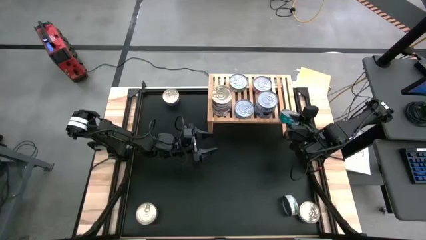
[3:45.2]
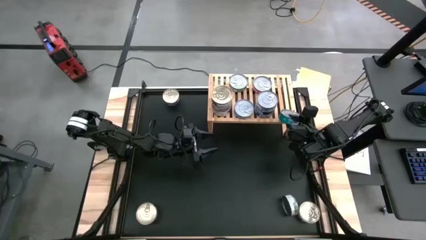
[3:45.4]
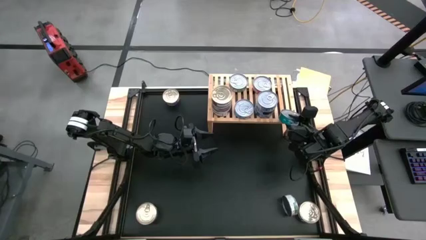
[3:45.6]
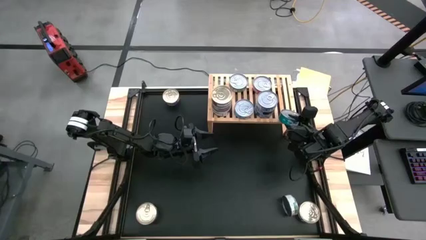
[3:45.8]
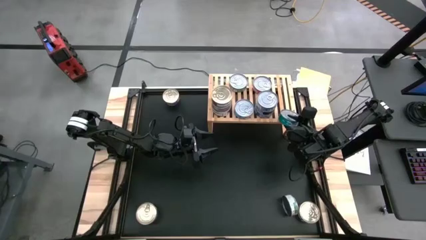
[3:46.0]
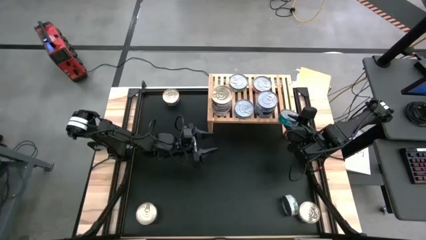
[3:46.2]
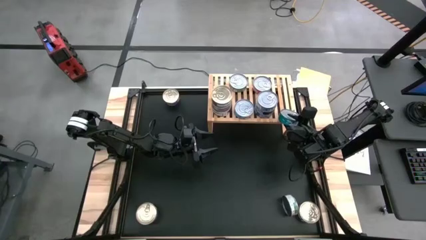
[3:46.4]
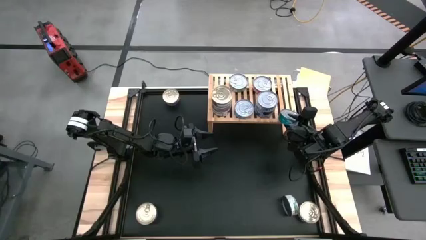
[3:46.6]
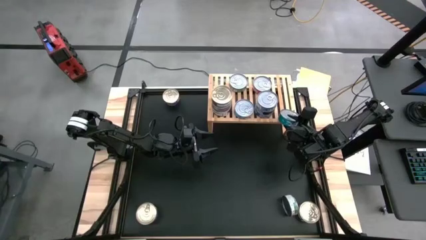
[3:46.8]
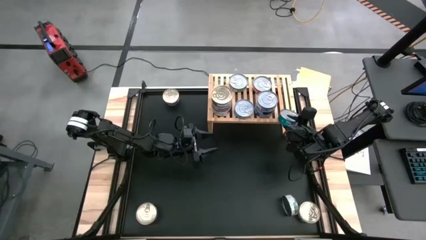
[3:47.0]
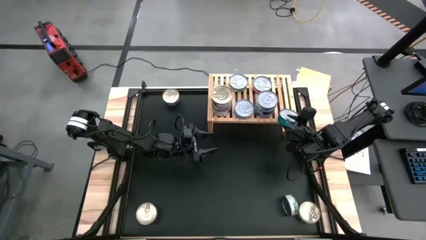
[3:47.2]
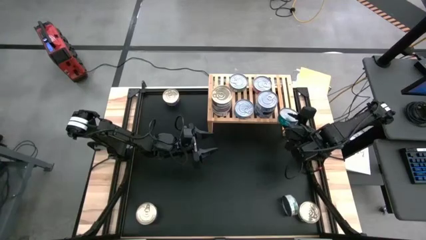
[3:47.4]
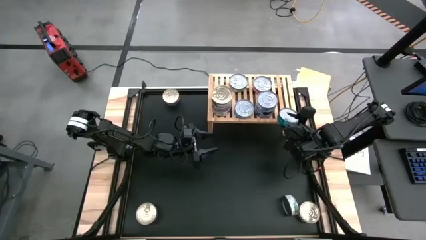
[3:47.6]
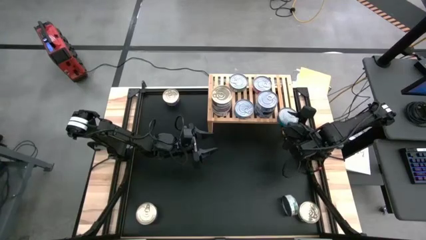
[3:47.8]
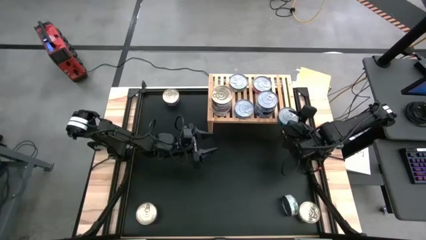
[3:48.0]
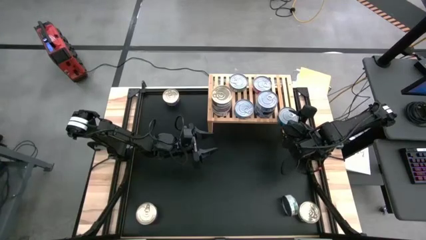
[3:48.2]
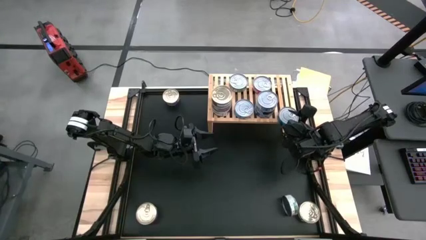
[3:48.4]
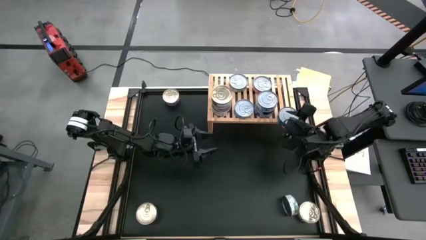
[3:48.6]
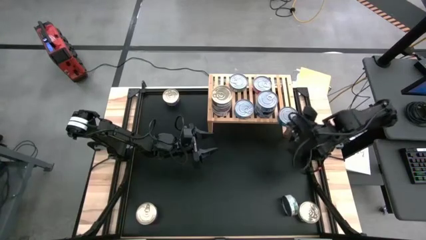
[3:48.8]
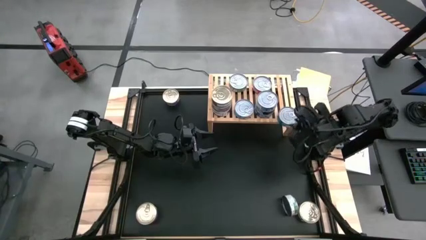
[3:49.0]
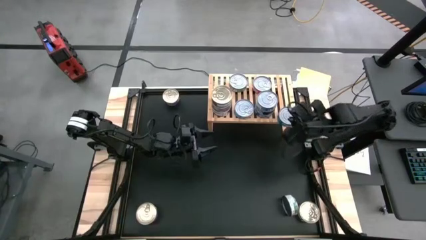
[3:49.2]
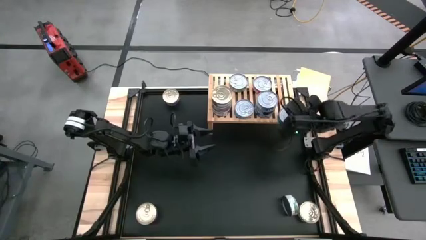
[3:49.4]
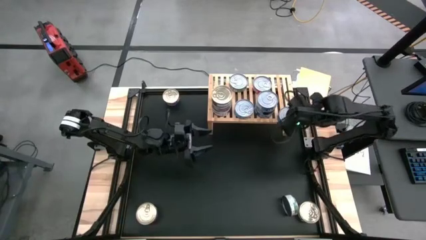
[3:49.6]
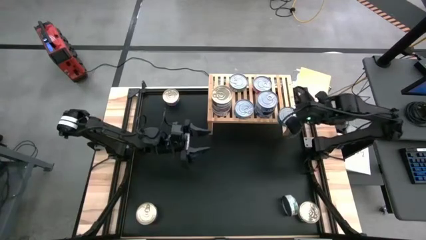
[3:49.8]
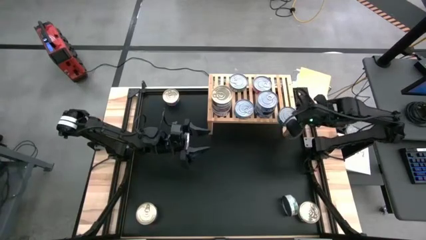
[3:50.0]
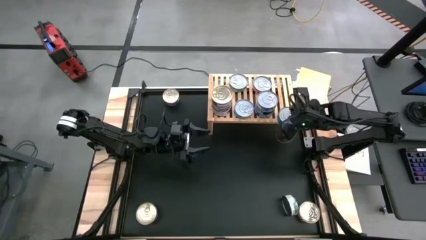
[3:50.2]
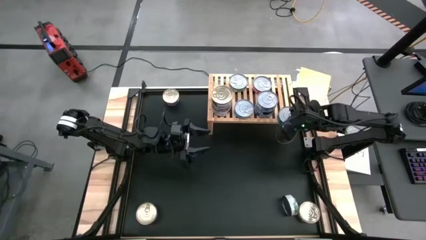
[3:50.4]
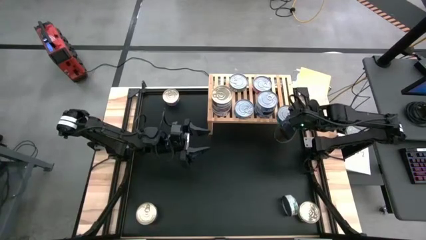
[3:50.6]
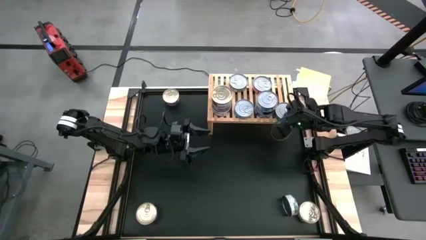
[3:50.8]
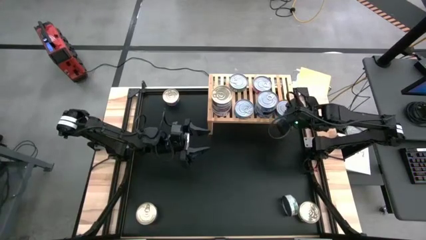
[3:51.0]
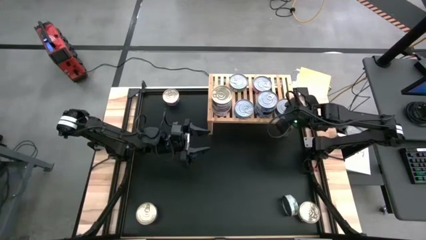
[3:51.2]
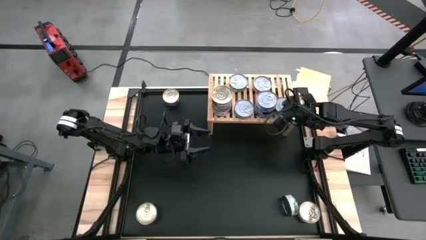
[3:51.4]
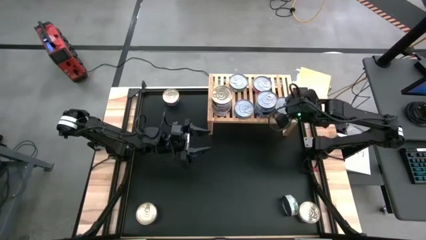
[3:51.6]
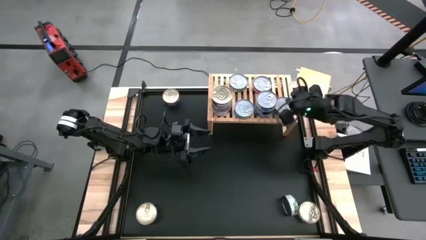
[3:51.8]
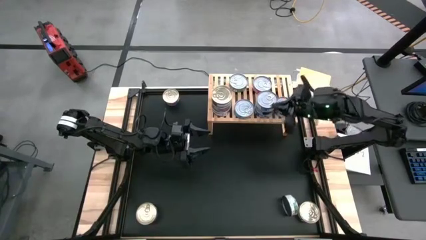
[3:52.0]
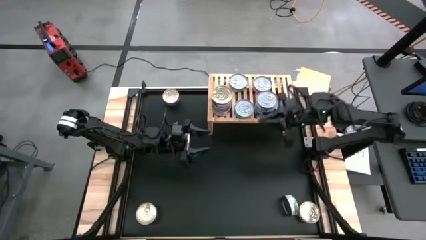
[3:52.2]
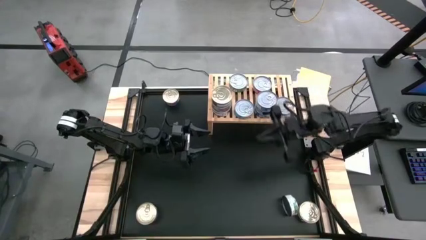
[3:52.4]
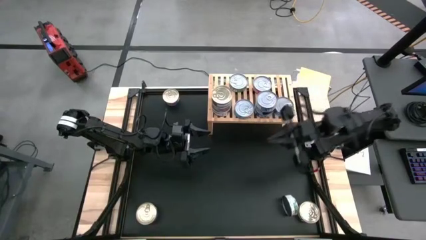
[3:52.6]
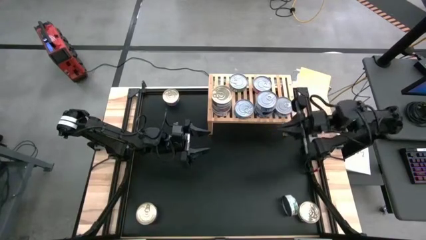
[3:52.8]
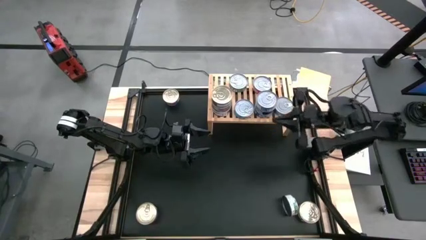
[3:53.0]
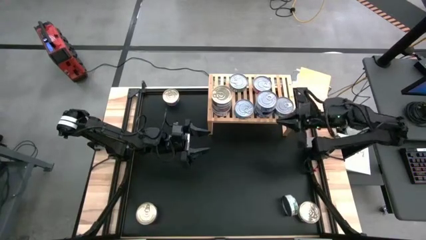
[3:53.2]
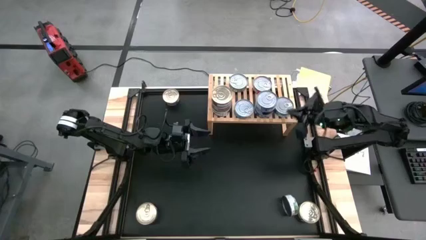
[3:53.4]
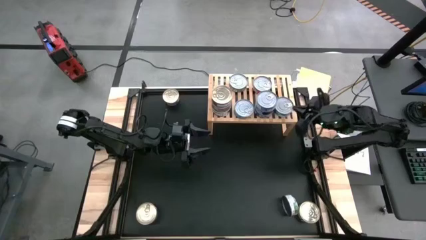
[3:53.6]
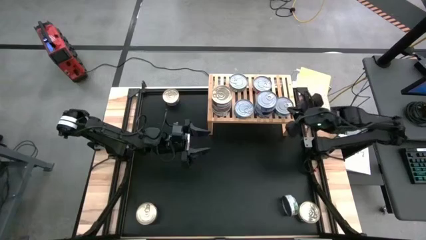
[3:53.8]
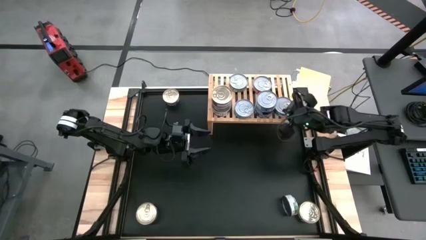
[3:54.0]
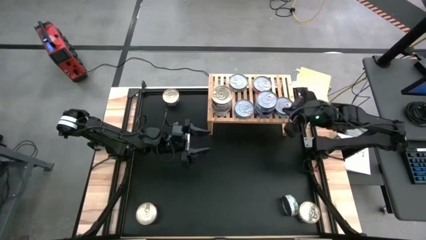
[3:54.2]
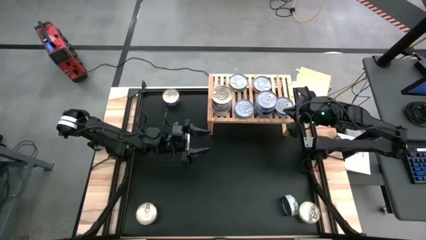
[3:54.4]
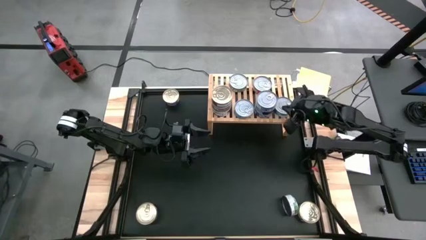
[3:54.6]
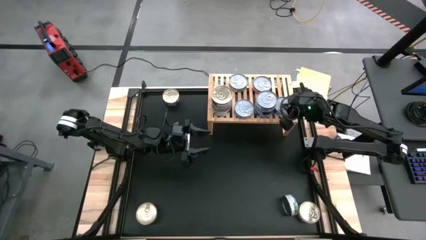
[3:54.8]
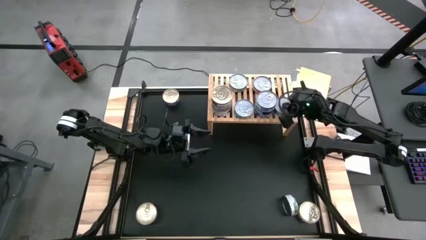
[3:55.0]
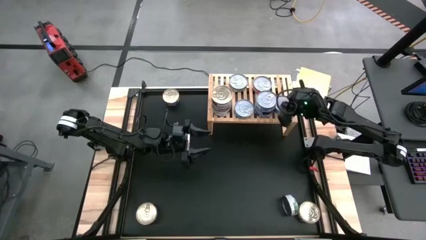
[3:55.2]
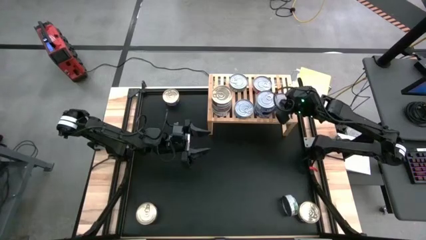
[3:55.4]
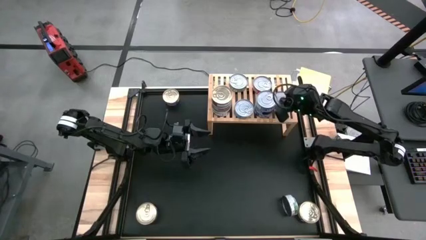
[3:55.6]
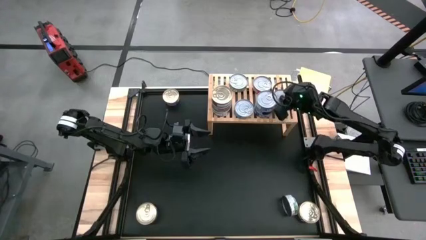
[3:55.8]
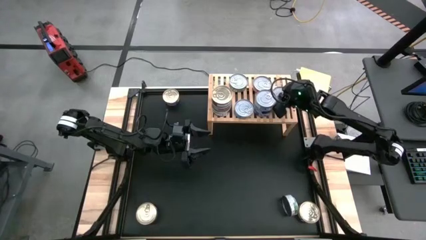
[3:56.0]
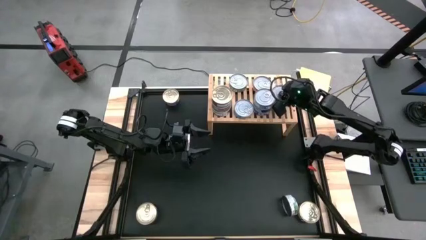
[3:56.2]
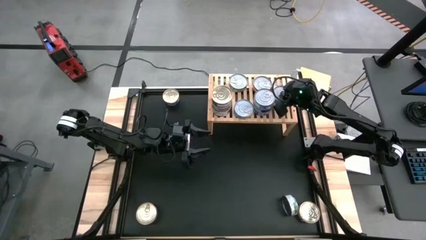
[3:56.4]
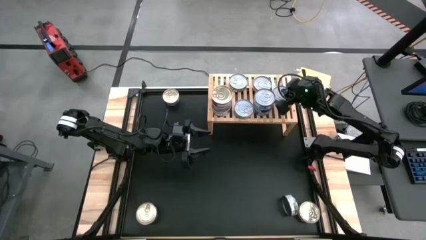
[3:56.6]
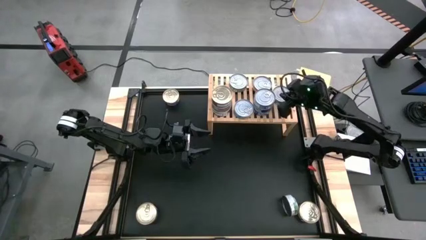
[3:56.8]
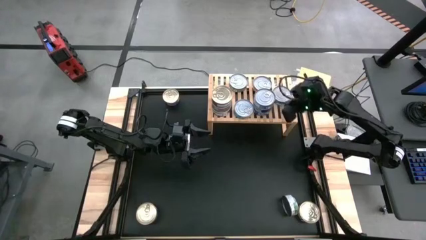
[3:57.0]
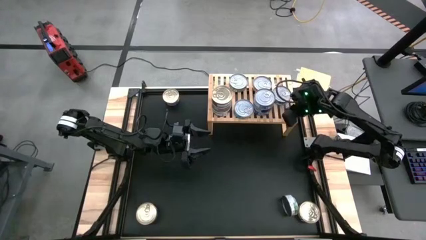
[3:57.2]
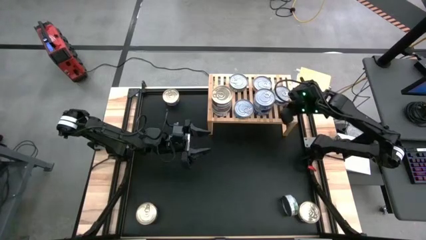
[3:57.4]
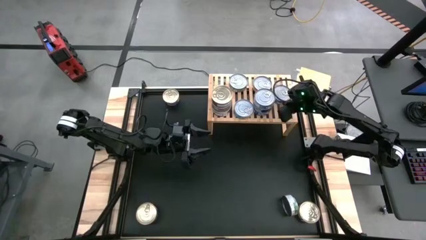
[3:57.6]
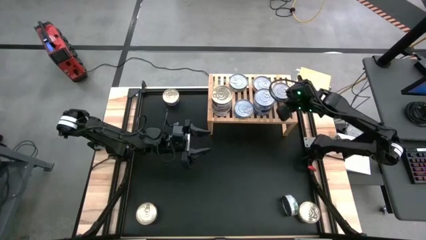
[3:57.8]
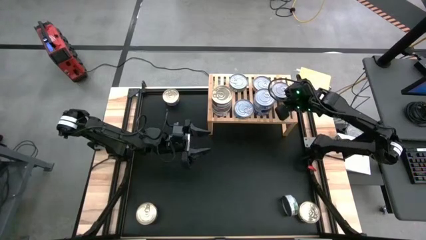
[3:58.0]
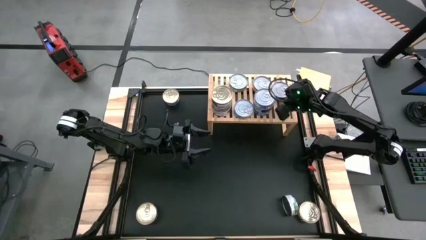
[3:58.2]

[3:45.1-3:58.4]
Task: Stack canned seafood by type on shelf
Put the green blue tuna can on the shelf
